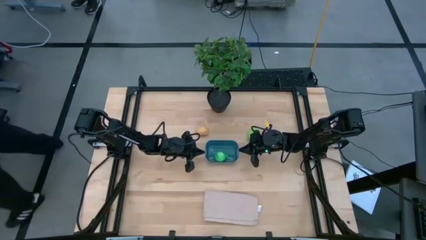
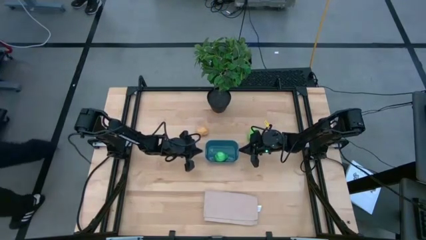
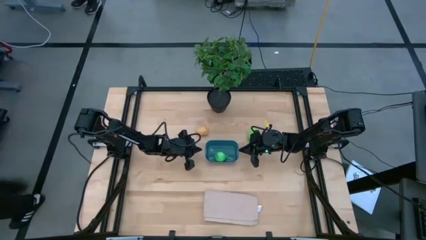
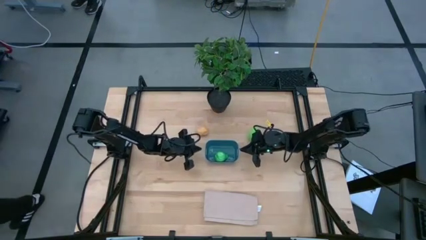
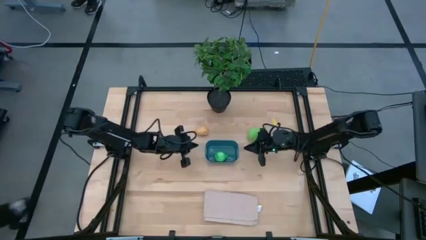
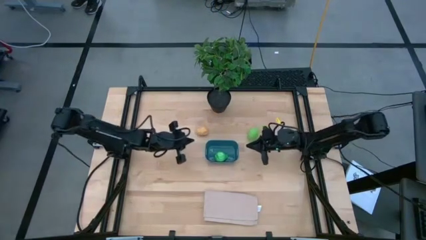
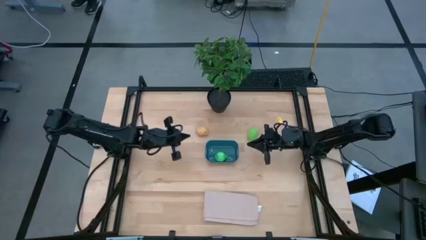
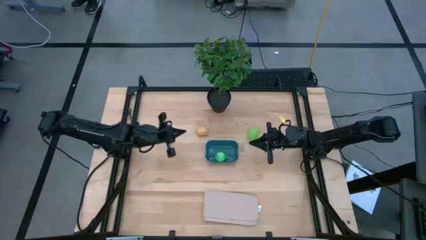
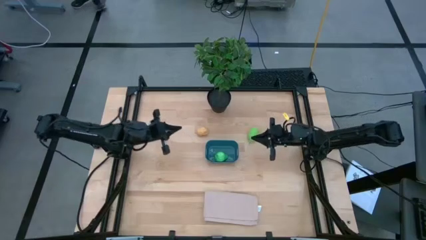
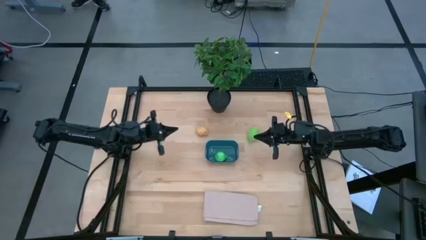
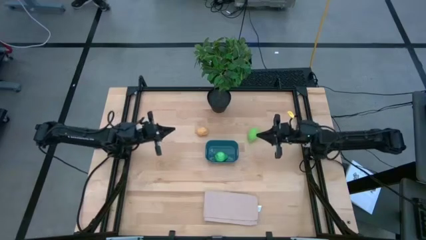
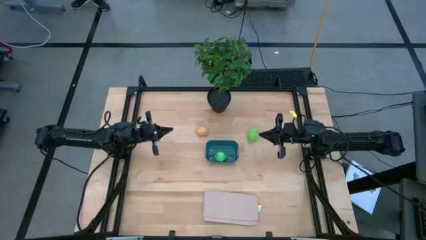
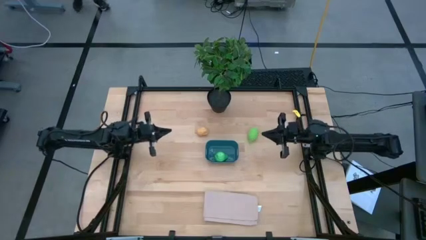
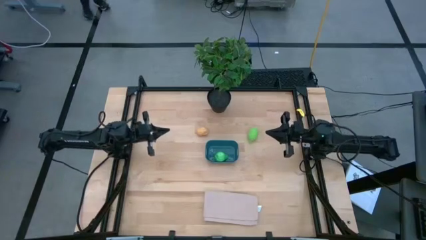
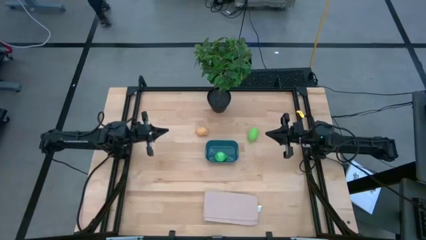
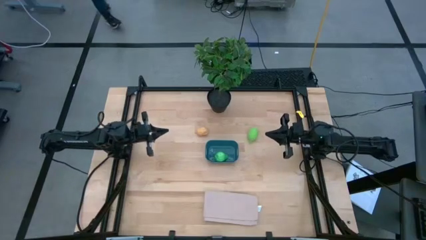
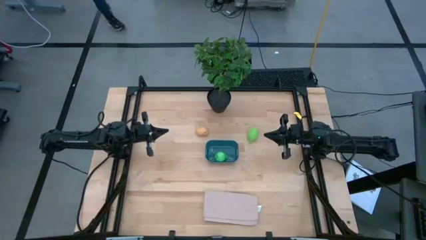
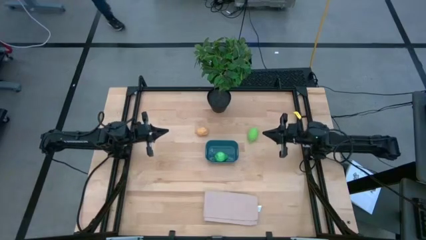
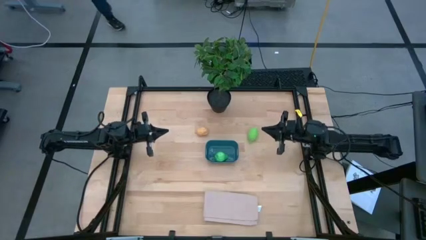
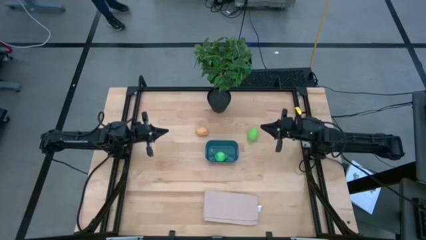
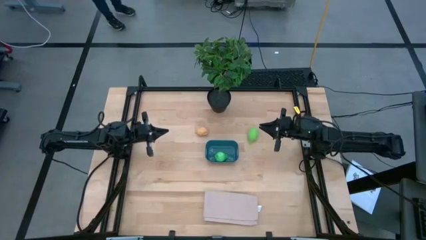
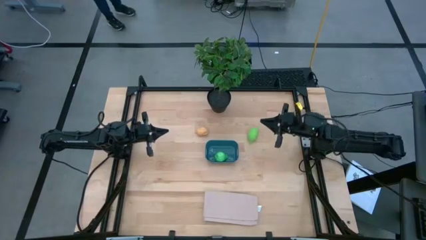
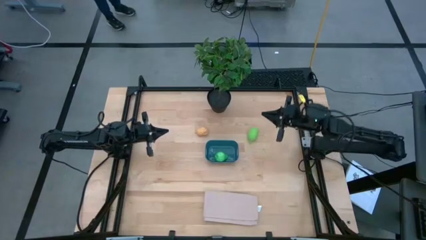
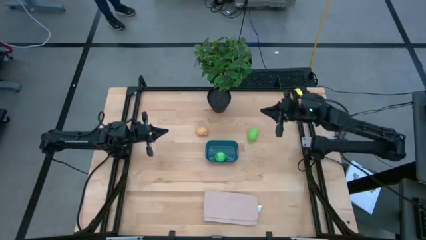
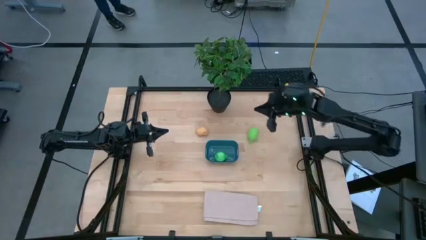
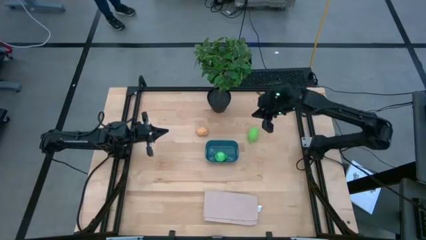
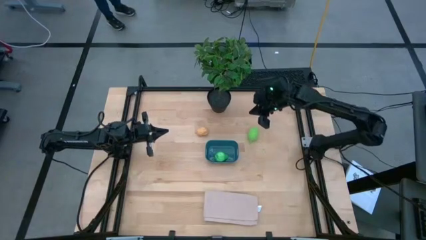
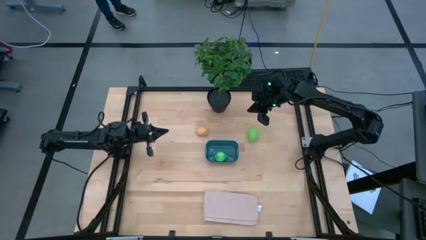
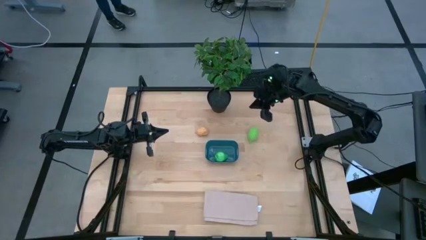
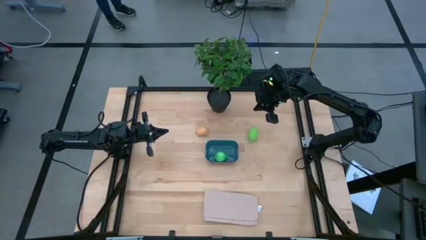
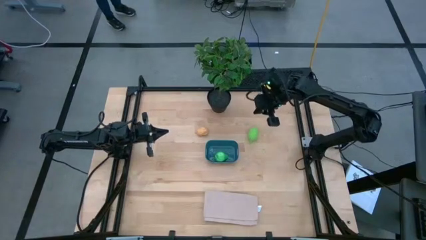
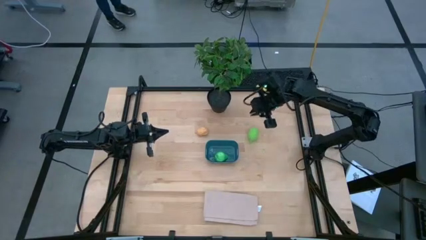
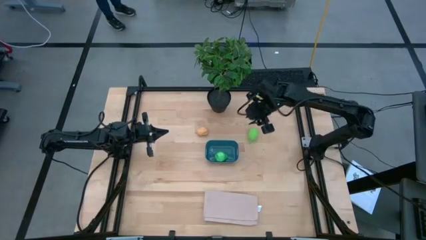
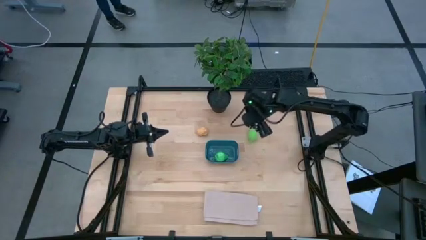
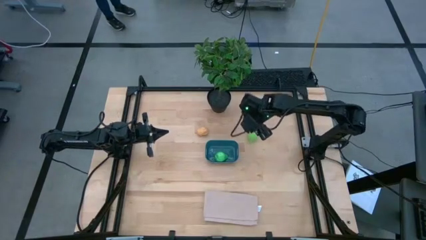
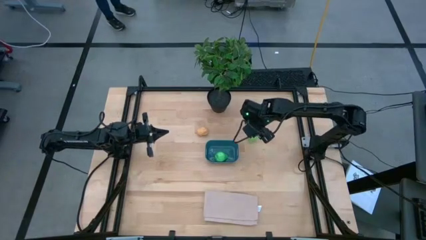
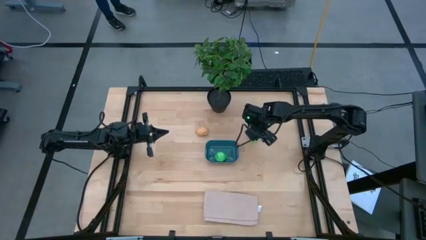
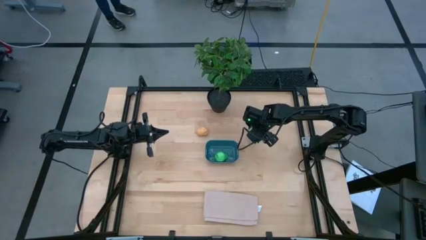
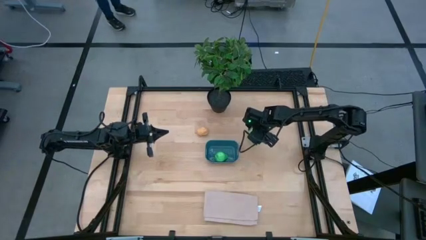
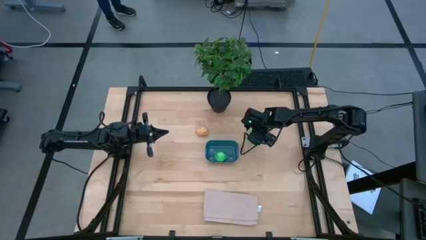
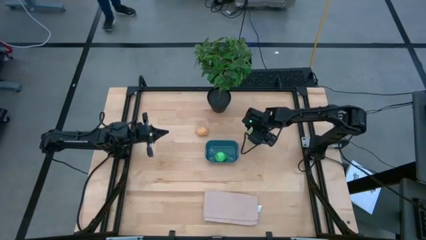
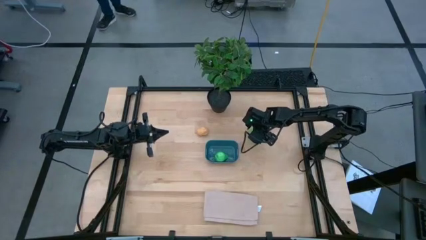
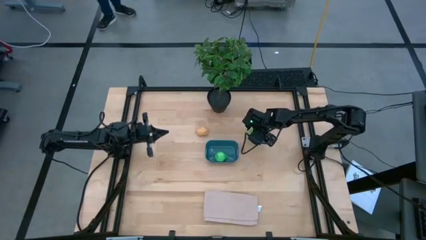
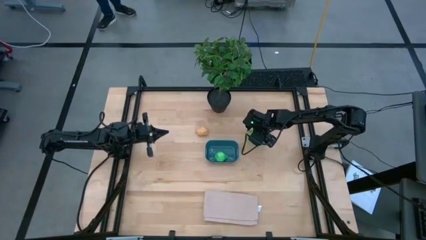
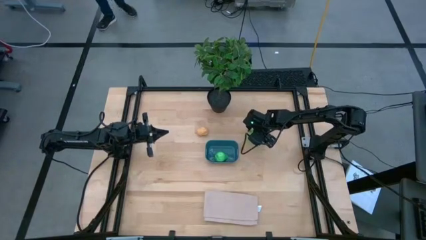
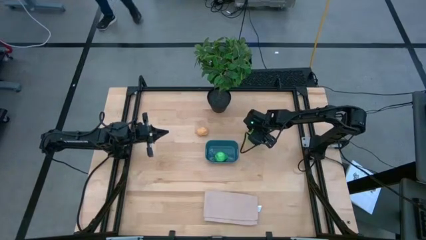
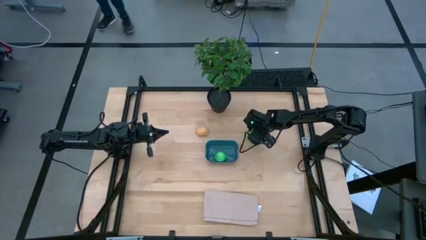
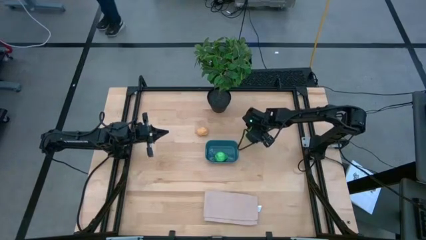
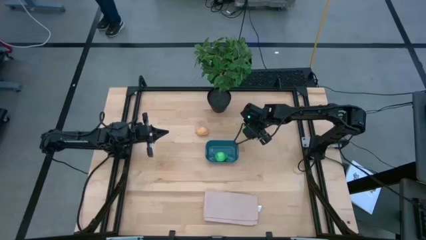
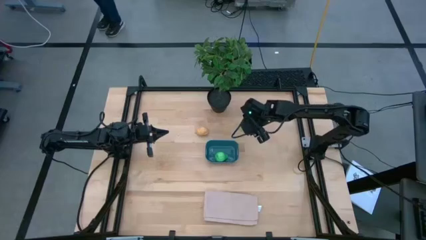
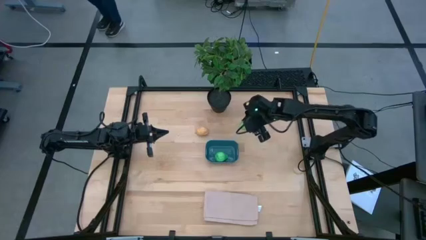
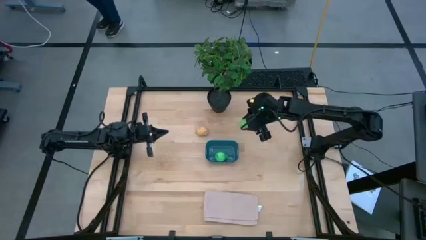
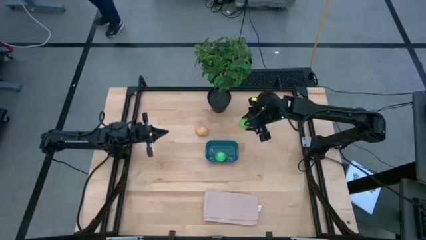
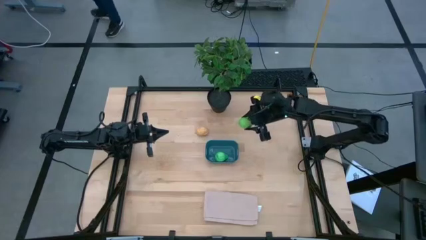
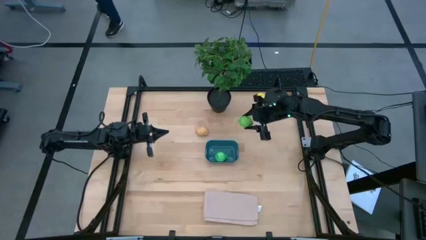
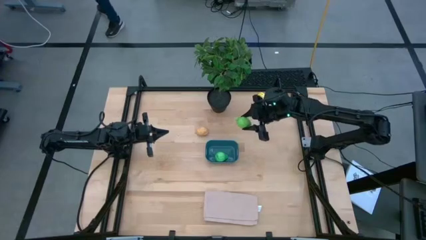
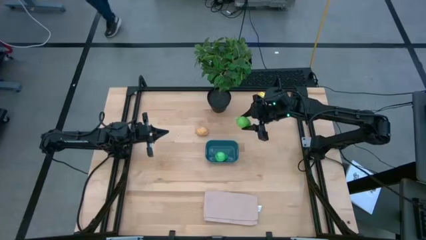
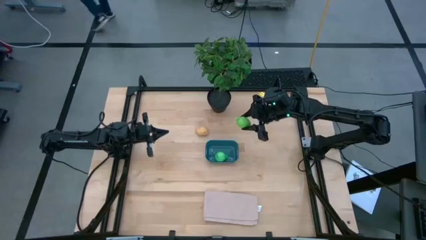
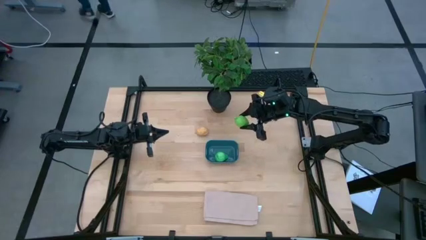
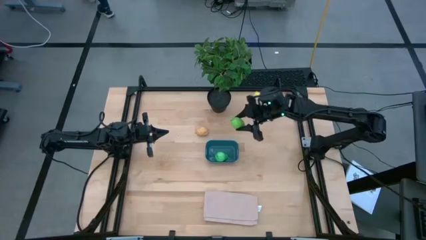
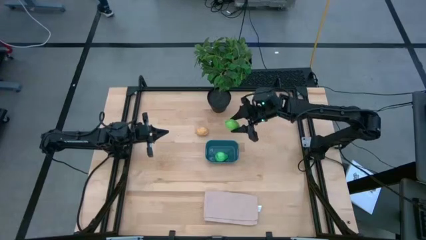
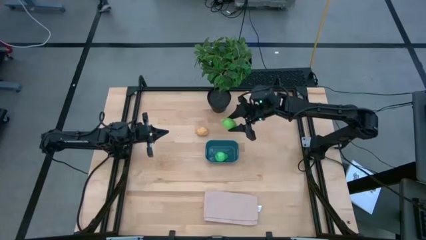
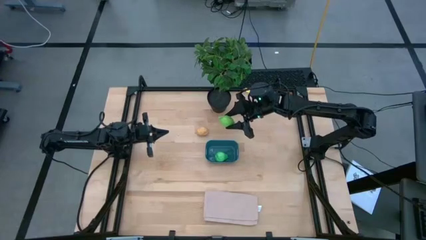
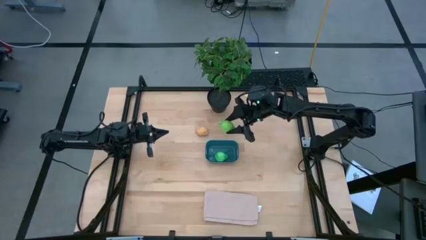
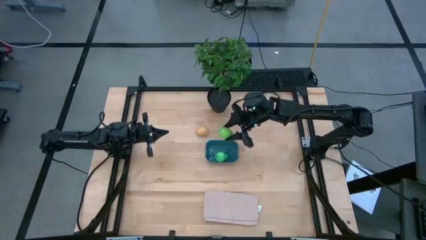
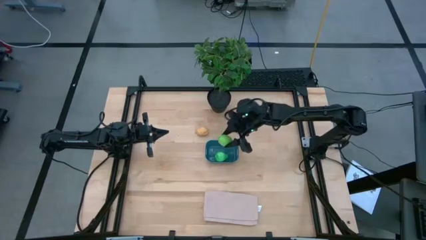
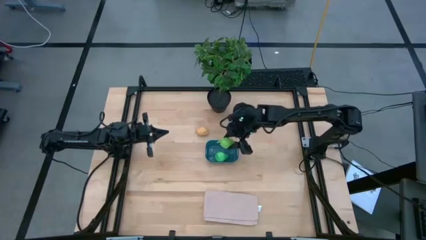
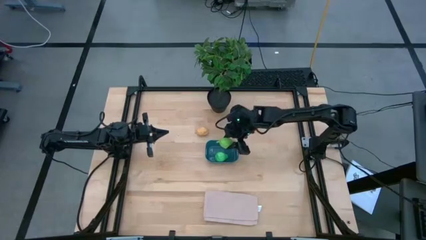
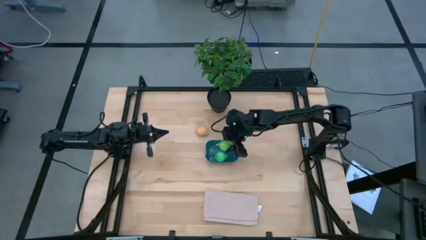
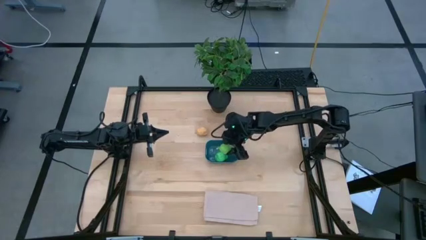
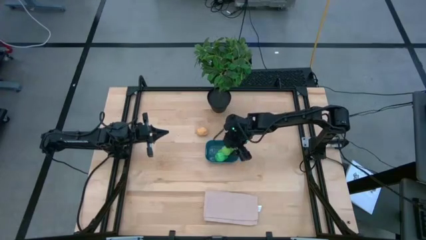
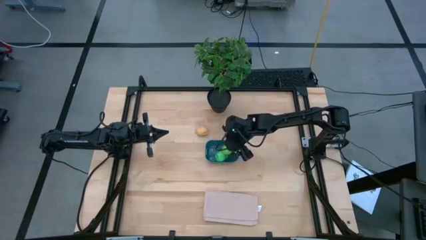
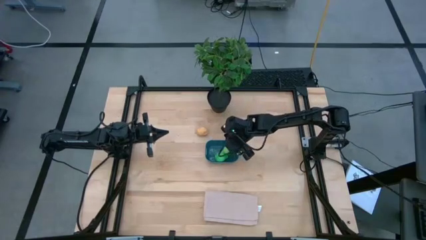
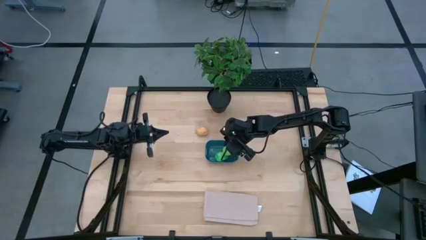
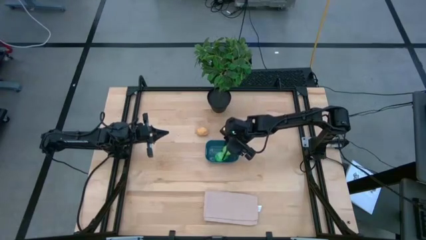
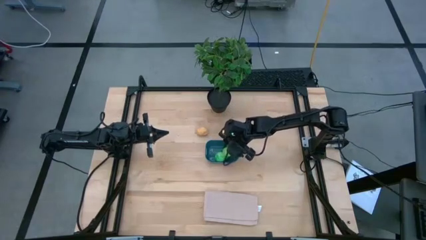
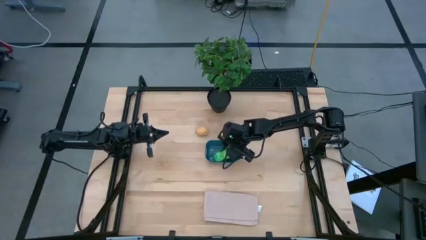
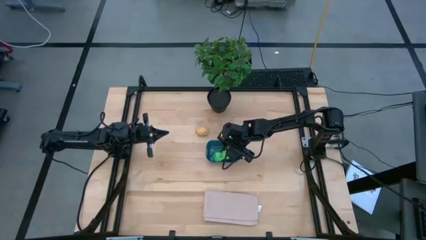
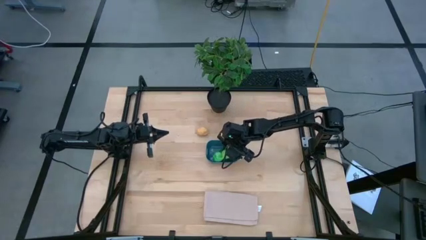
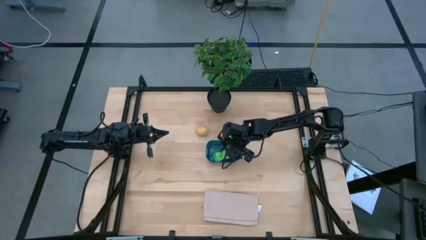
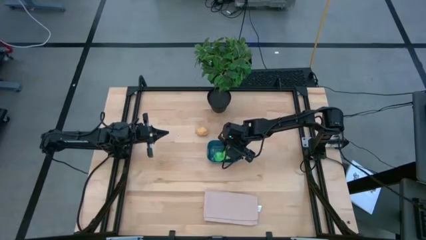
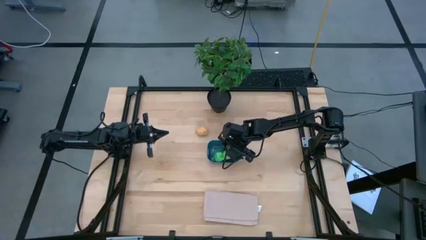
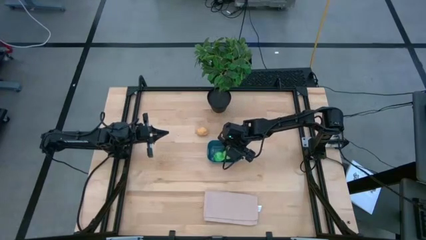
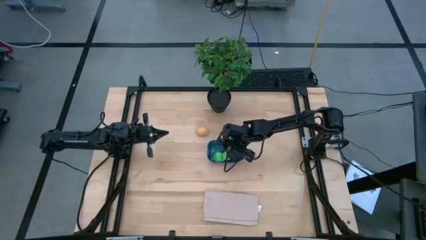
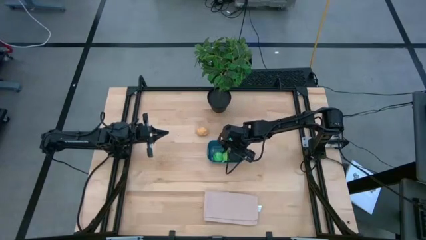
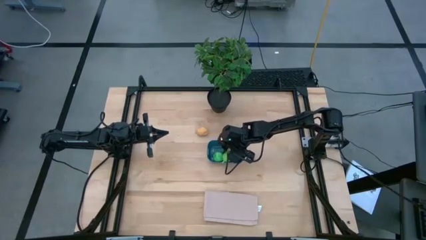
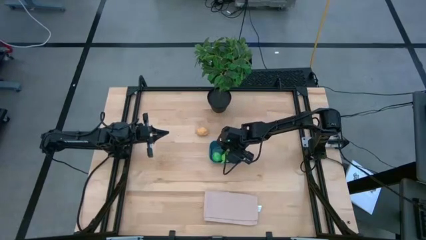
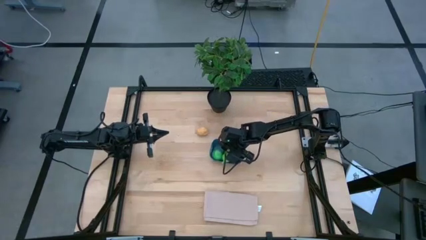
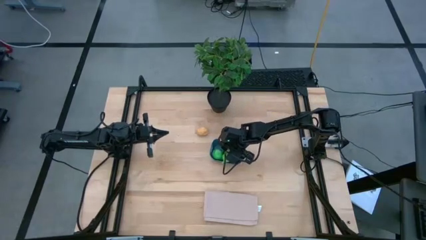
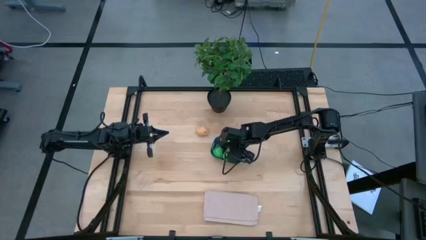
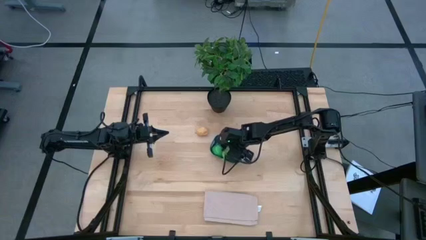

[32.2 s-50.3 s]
Task: Pick and placing Produce into tupperware
Put the lime into the blue container
